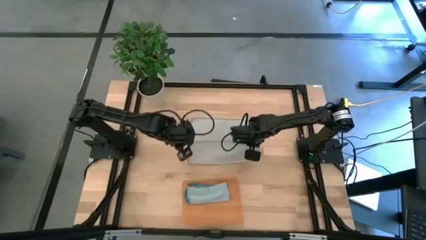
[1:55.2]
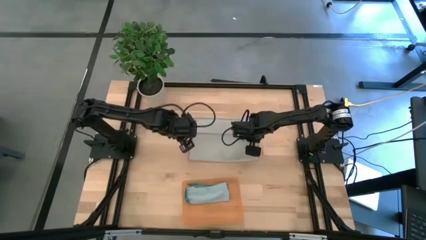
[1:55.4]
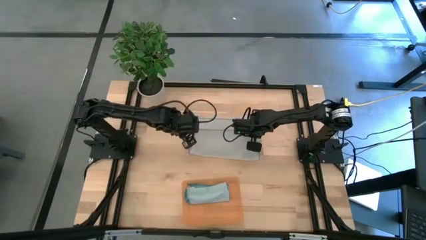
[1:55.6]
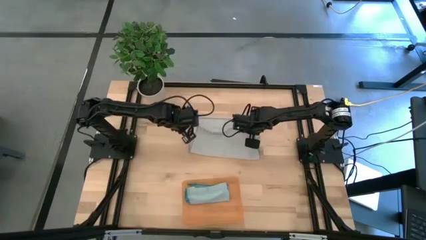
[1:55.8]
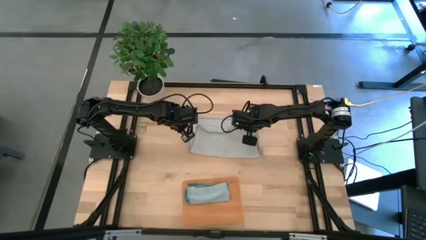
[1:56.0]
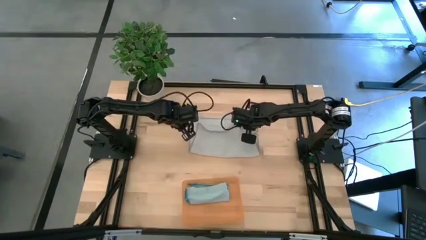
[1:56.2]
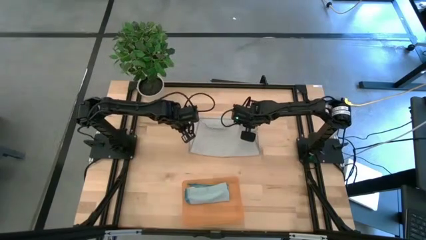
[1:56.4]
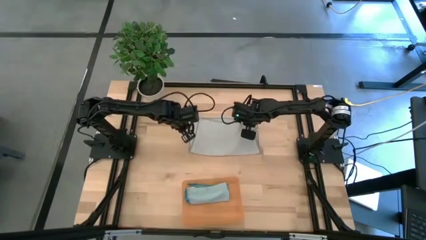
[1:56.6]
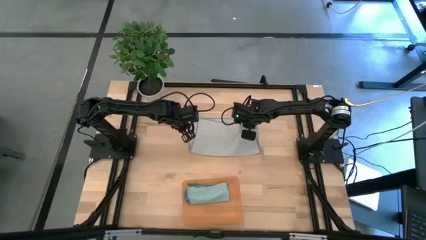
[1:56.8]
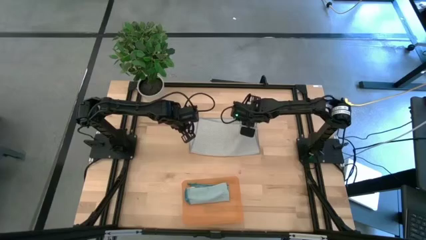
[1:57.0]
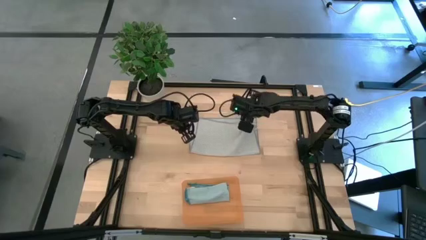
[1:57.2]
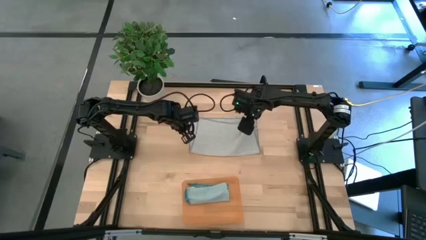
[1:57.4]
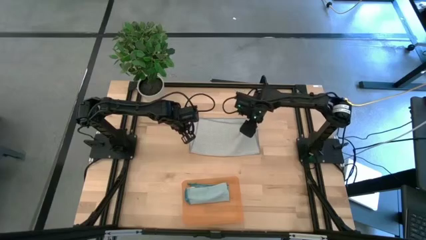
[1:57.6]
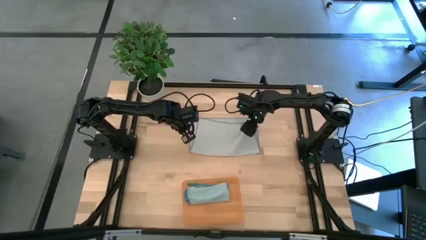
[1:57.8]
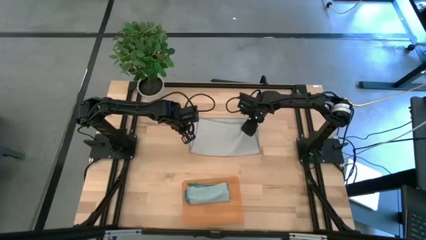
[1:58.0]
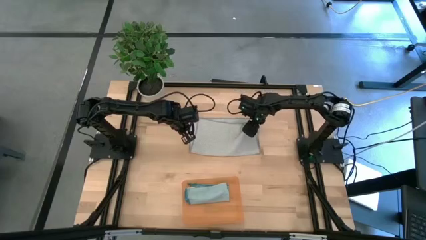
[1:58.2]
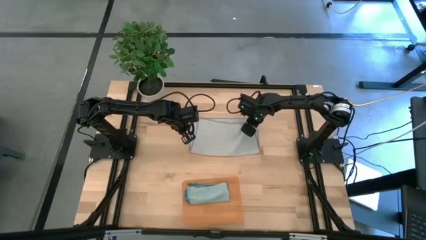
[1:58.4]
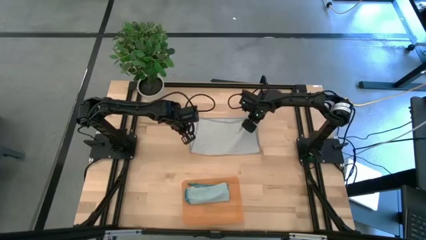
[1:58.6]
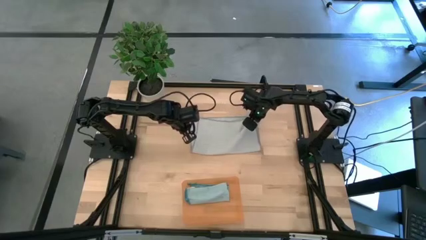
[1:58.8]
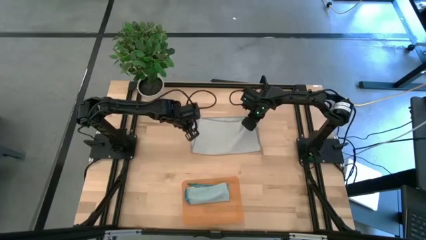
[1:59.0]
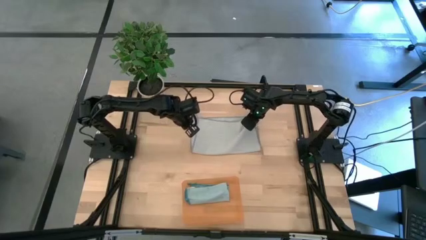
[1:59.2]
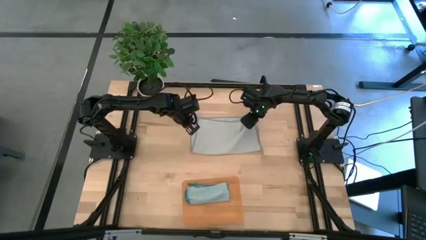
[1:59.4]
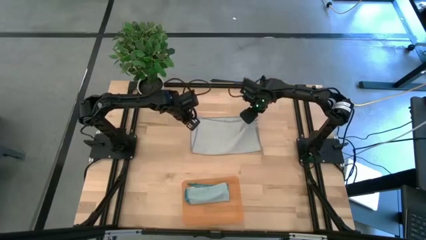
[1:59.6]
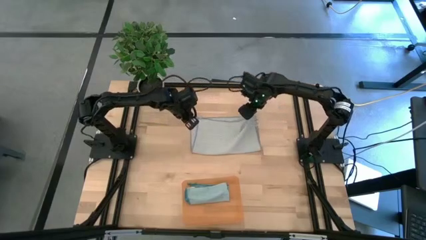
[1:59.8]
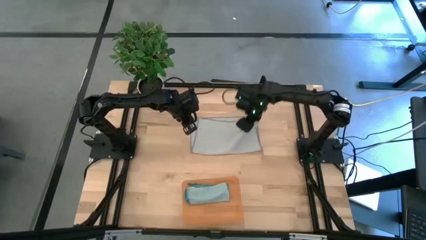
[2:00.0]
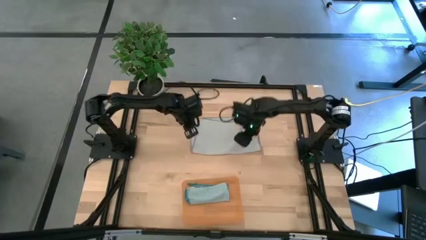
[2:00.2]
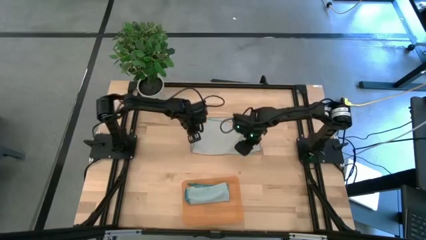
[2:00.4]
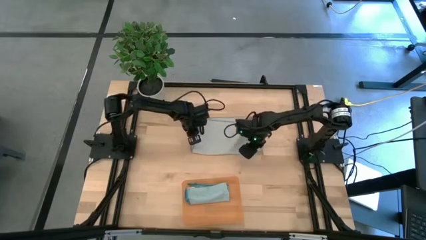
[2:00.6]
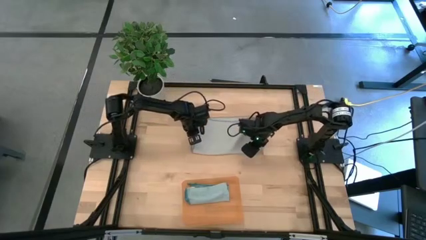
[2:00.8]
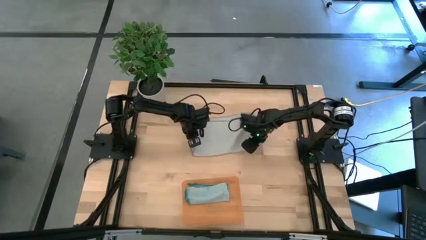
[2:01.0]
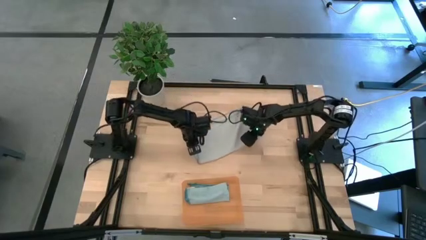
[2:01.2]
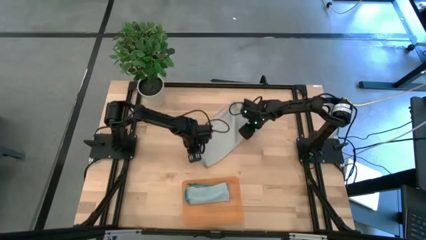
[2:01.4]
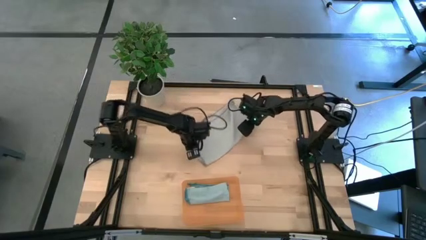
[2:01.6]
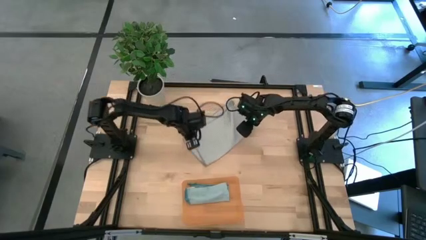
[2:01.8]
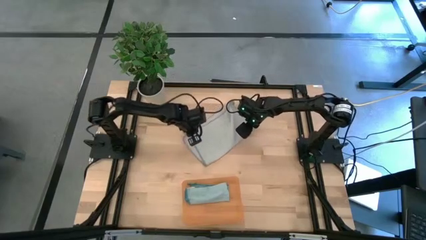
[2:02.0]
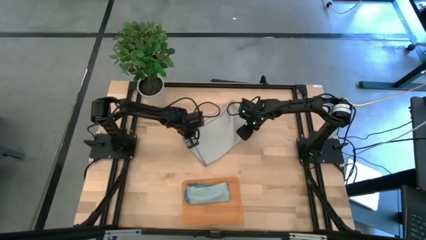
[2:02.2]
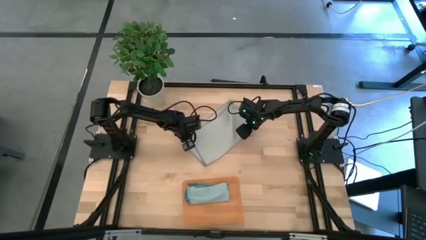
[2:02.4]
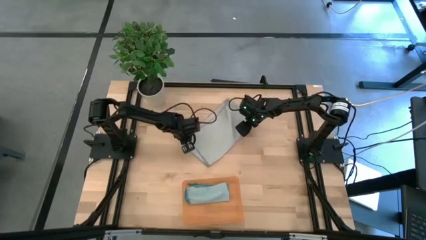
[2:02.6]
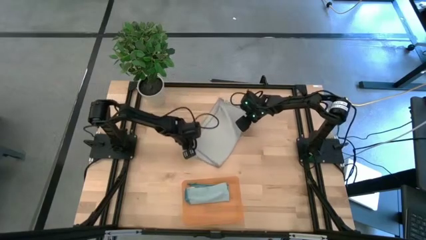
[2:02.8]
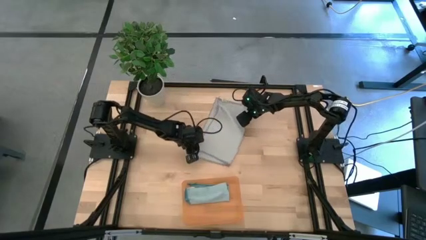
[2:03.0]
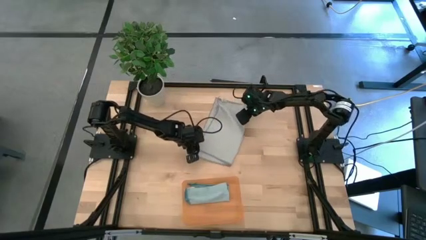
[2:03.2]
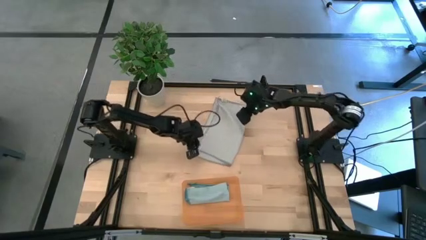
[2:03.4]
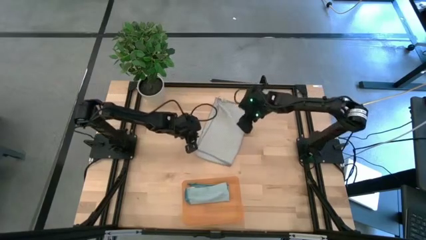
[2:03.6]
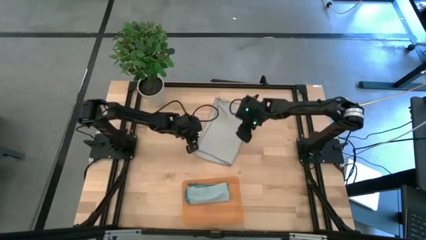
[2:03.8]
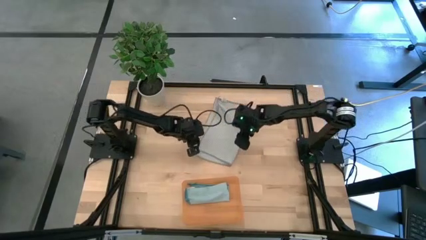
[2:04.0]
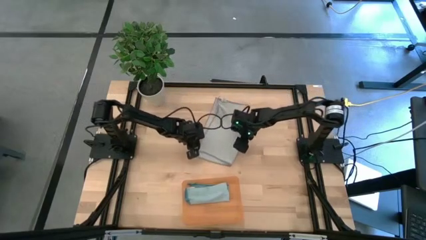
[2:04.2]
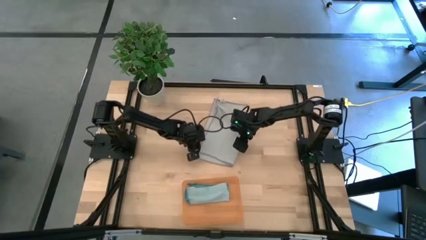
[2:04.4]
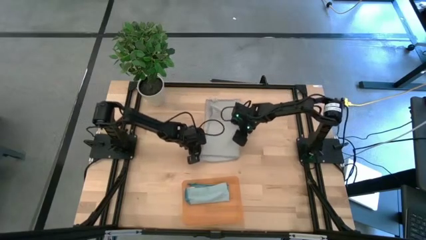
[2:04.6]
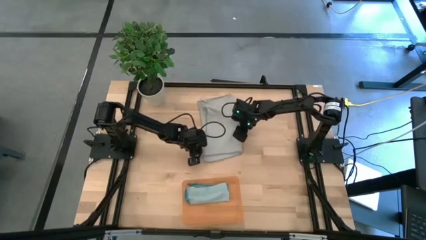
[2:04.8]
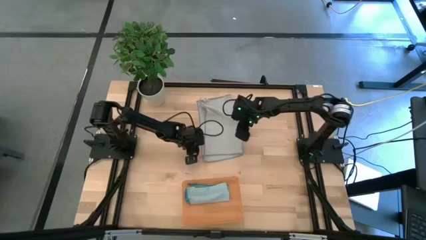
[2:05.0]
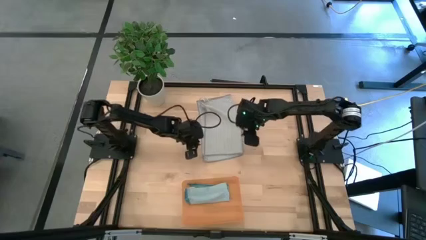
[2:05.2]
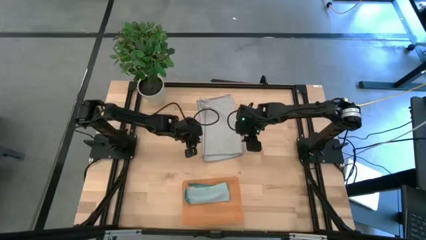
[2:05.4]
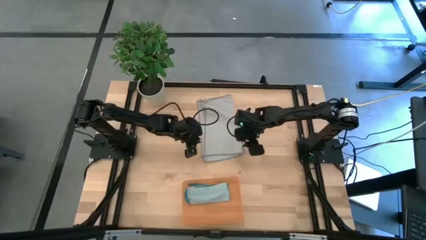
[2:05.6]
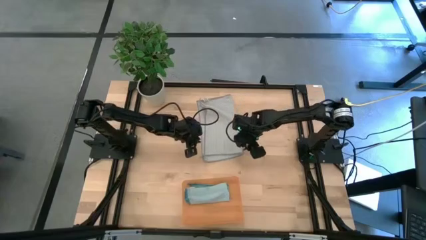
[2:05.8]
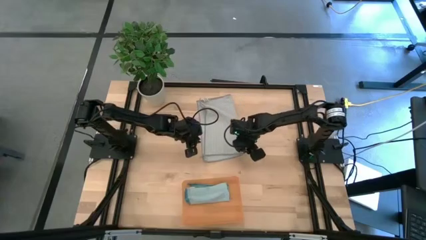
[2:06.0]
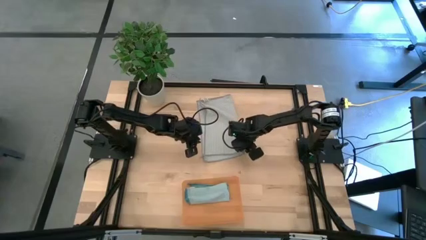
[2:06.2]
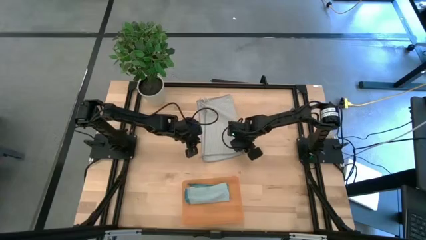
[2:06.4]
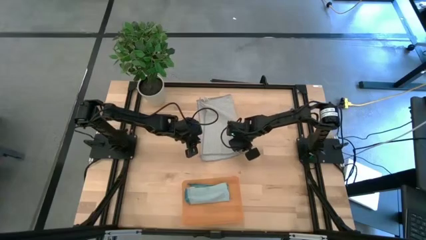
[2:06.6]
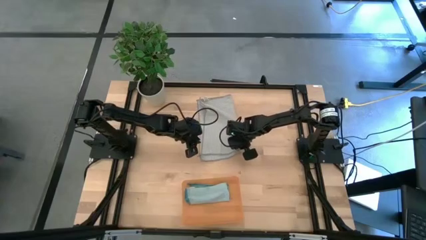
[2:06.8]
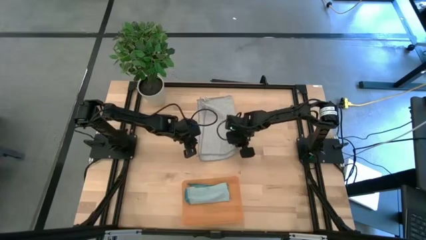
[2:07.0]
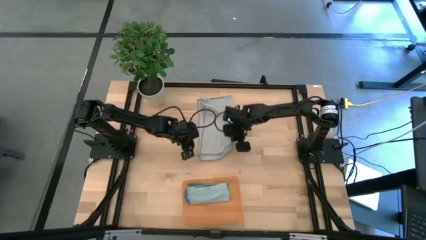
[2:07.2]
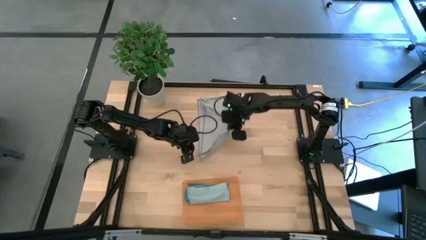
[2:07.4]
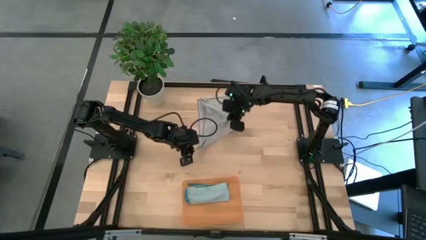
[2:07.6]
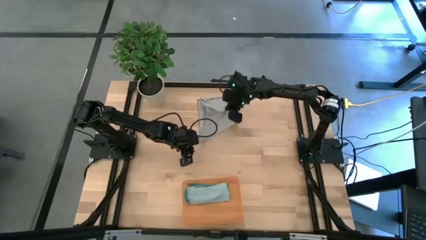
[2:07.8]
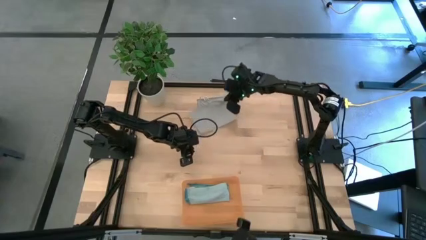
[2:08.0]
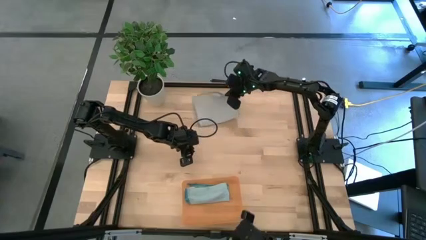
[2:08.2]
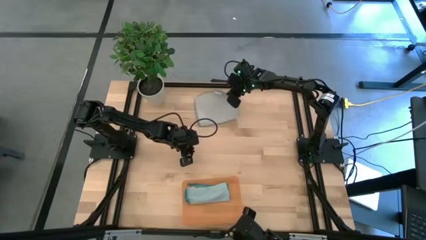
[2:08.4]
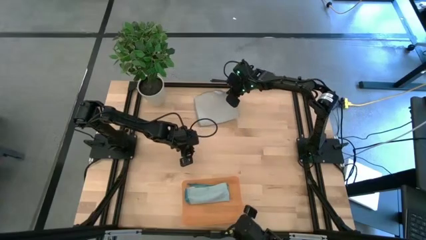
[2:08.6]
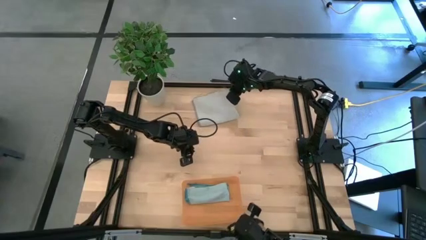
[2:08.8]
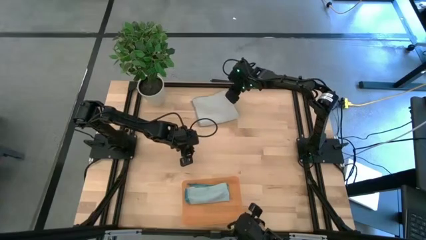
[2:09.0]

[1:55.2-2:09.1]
Task: Roll microfiber towels into tight, uniform cylinder then place into a basket
Fold the gray towel
